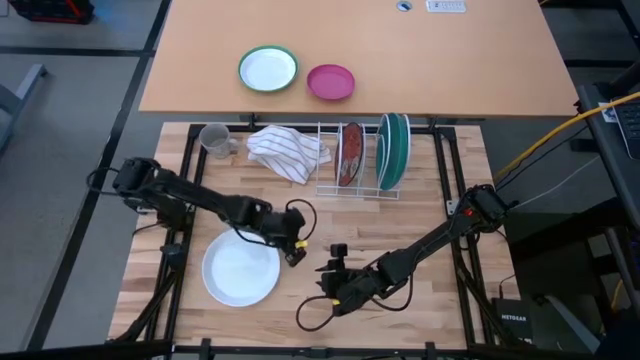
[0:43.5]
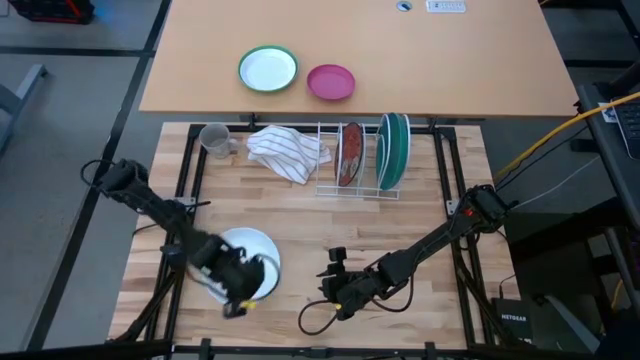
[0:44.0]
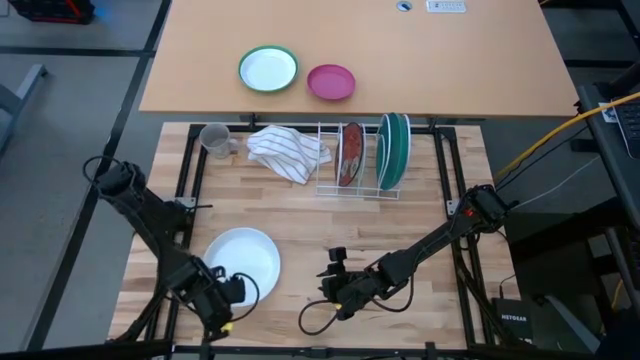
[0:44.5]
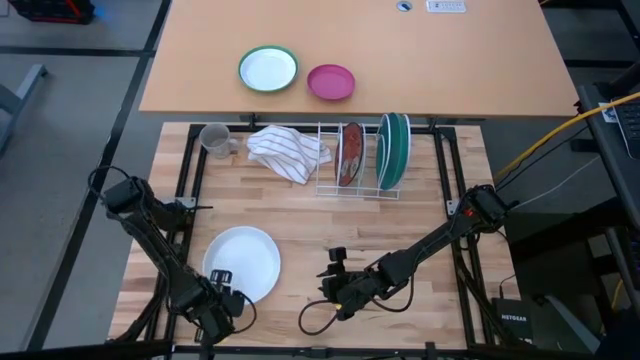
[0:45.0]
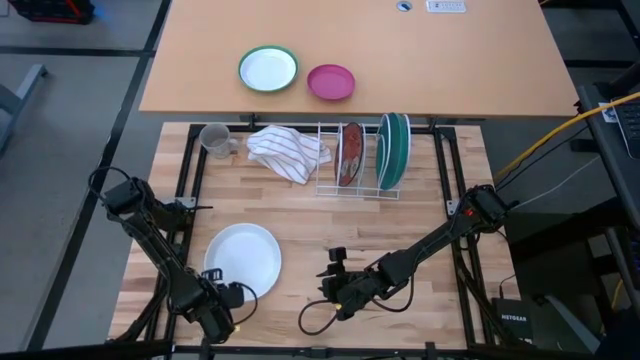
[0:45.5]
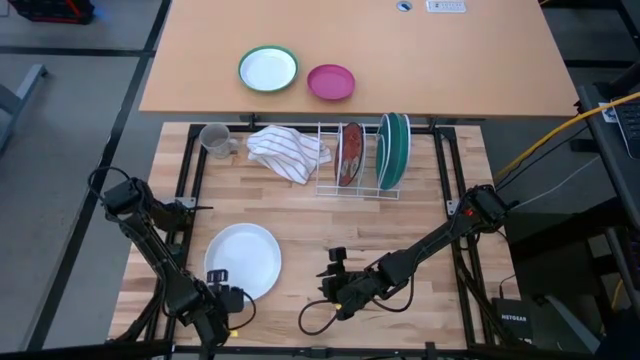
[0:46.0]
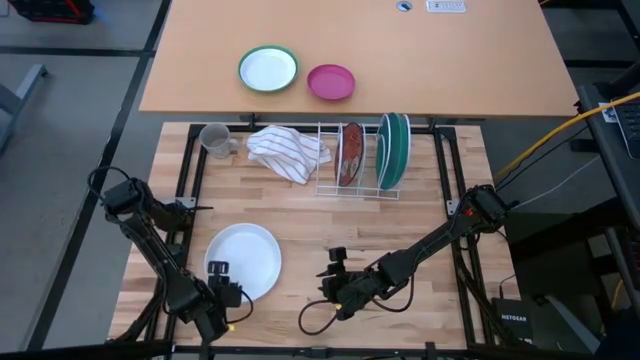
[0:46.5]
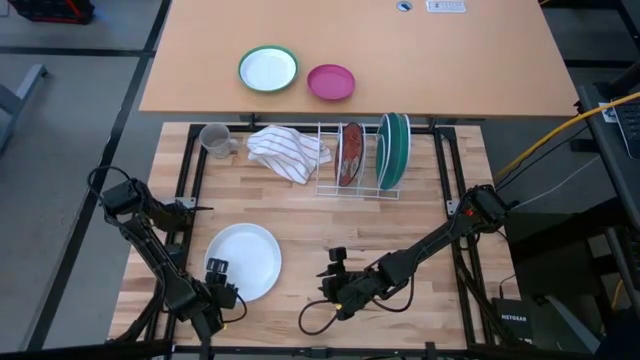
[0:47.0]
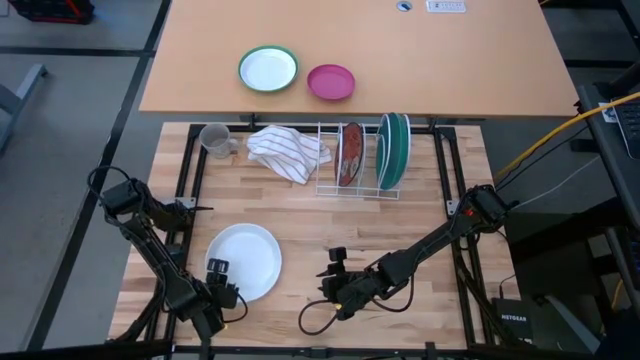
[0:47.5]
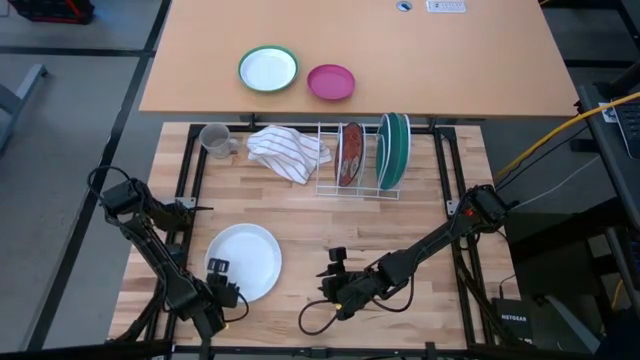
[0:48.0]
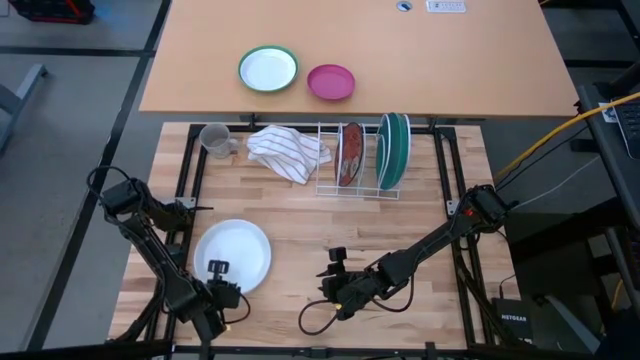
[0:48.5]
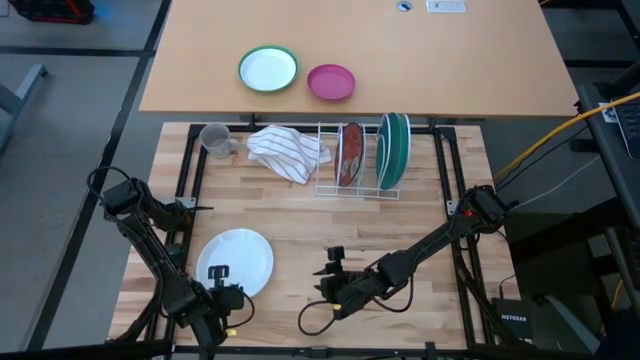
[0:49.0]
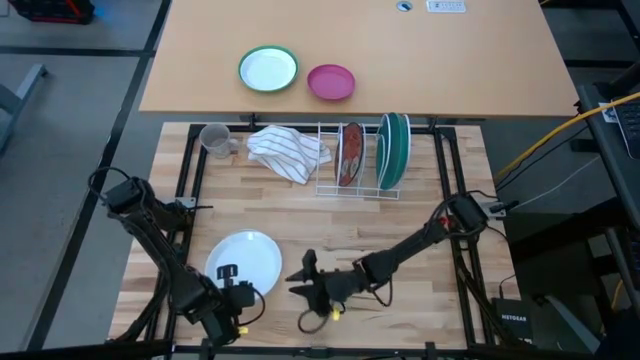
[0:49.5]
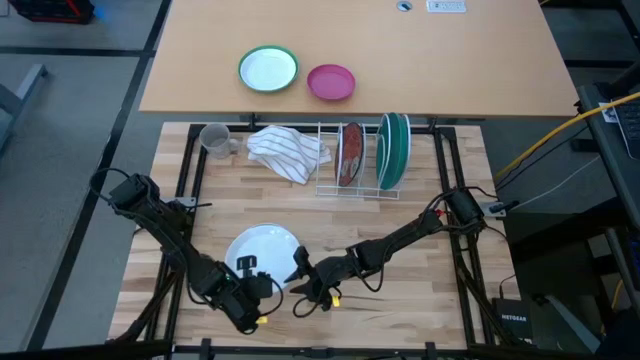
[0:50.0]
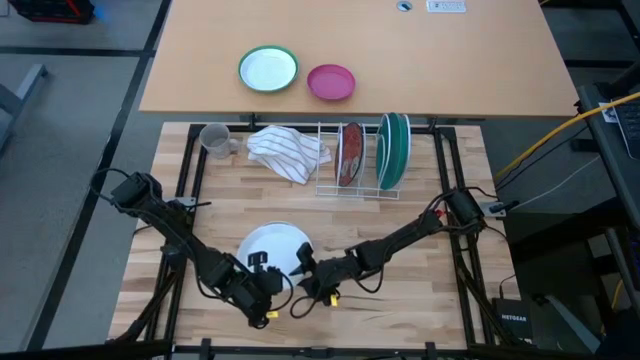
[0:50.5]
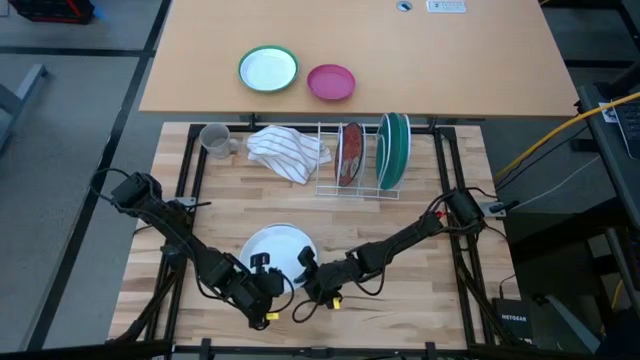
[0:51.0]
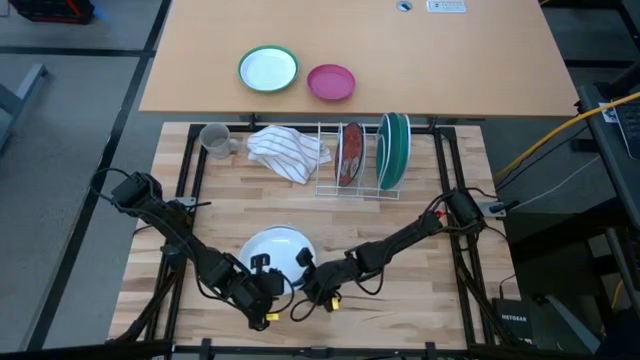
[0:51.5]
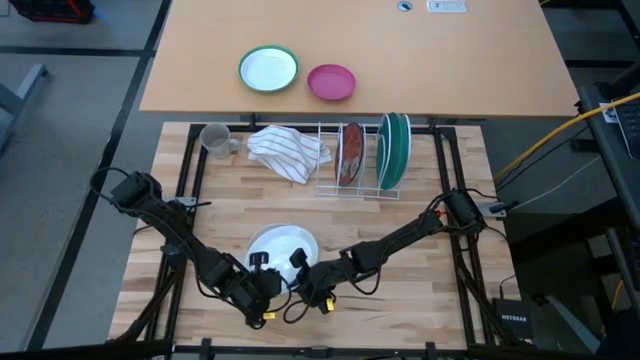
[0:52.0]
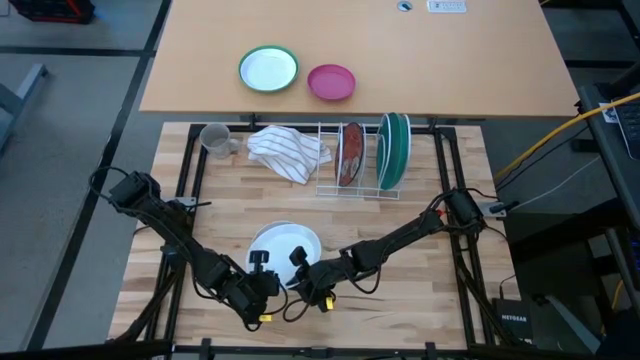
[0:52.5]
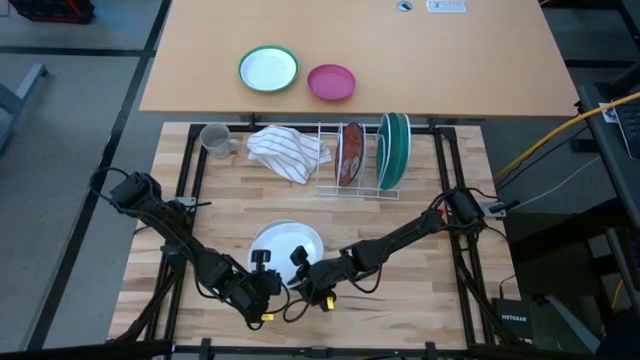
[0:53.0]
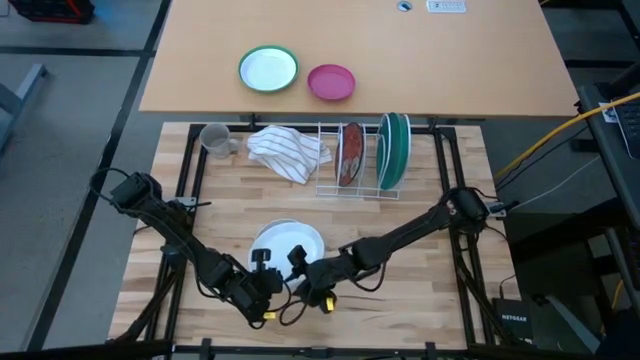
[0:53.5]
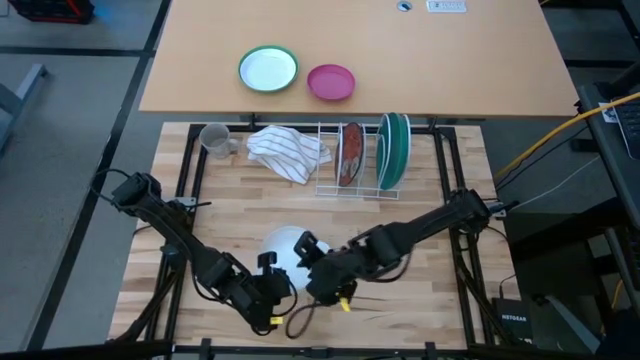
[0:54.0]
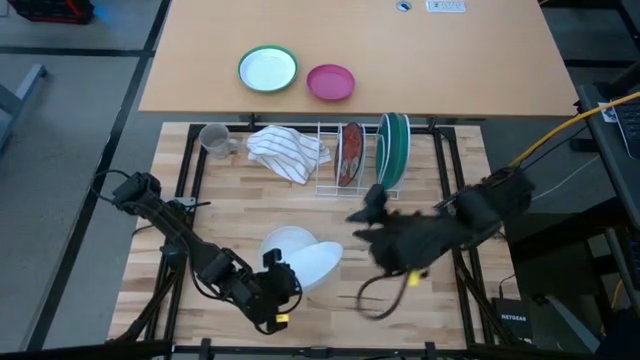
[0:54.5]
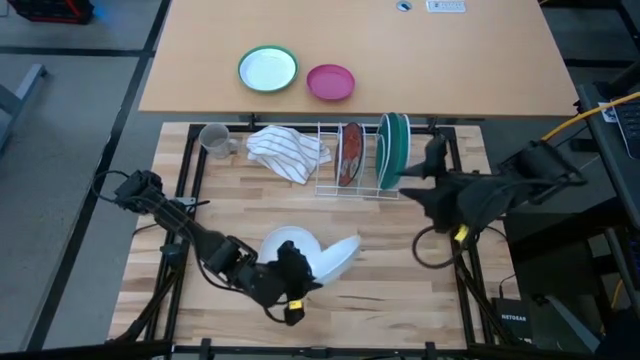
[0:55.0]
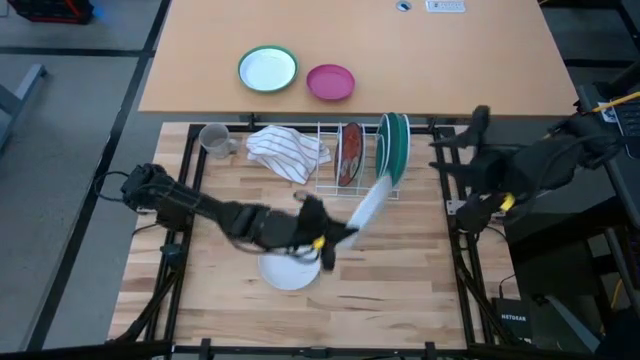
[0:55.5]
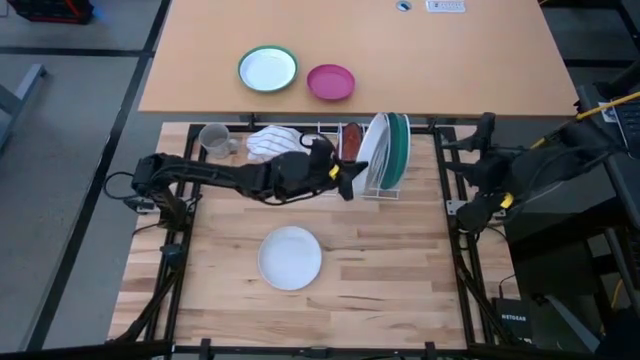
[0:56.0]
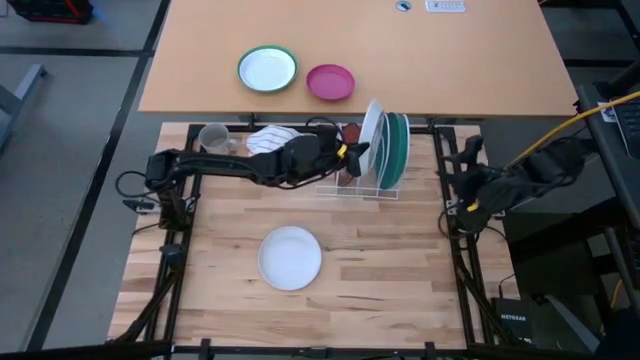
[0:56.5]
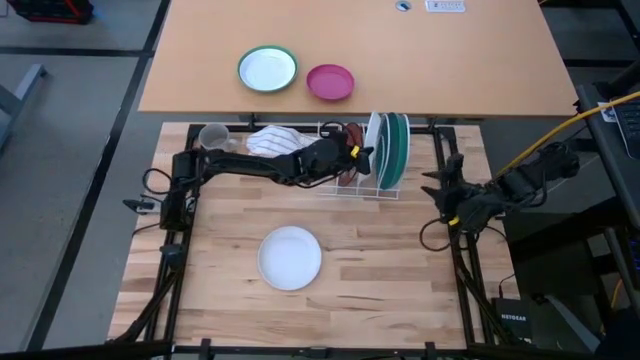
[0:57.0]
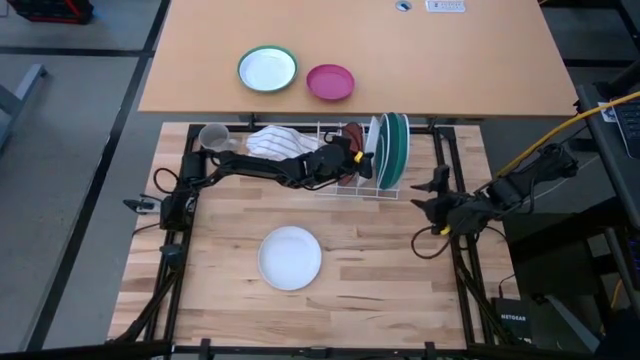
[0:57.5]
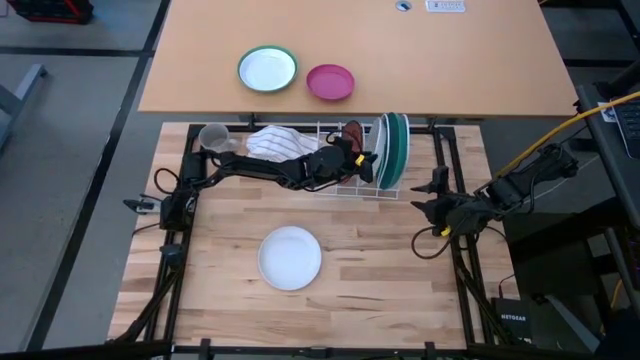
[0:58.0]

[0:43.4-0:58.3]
Task: Sort dishes
Put the white plate in the dish rack

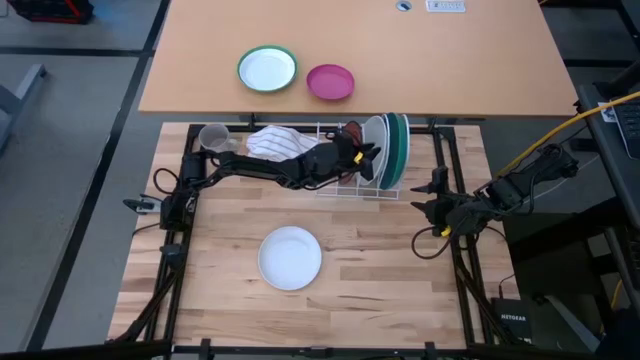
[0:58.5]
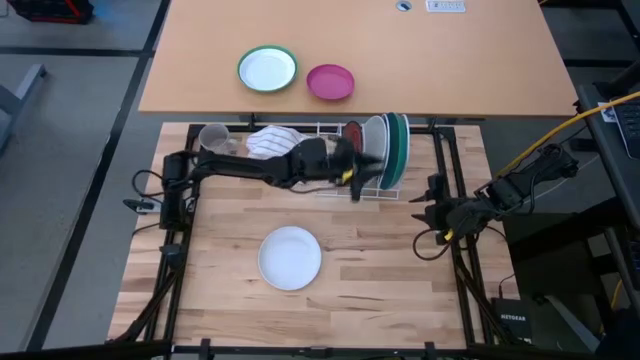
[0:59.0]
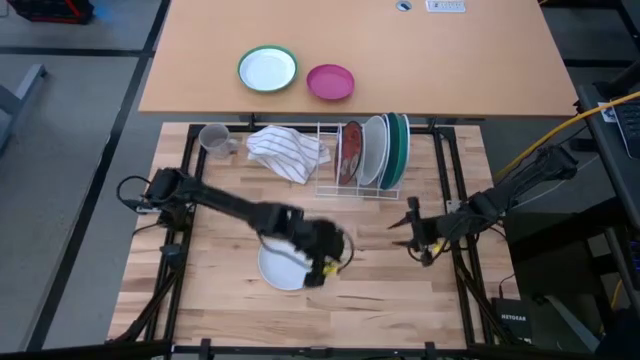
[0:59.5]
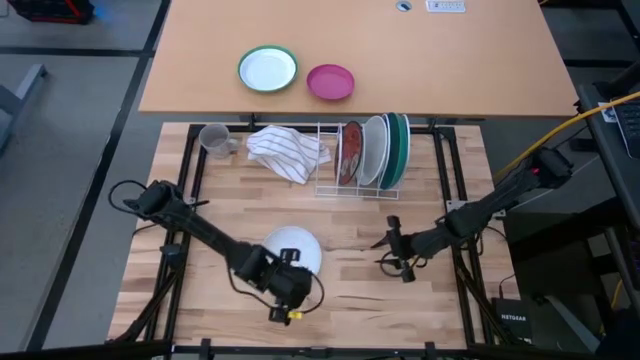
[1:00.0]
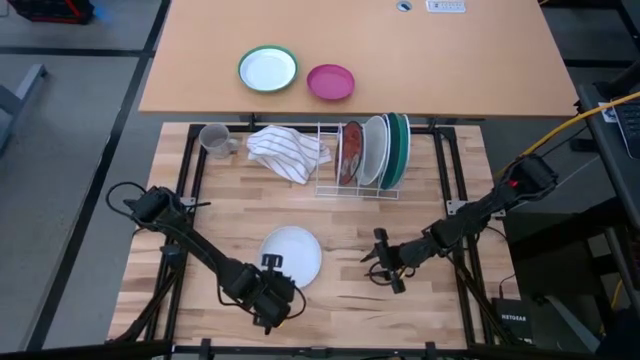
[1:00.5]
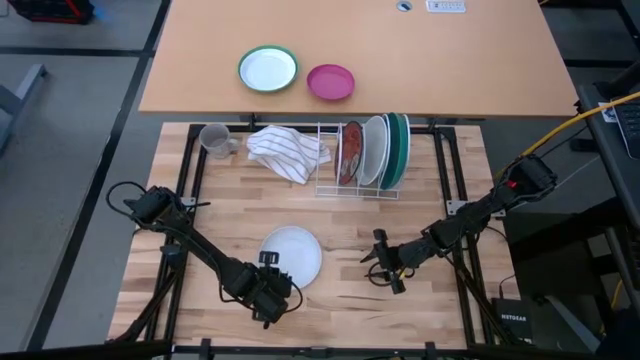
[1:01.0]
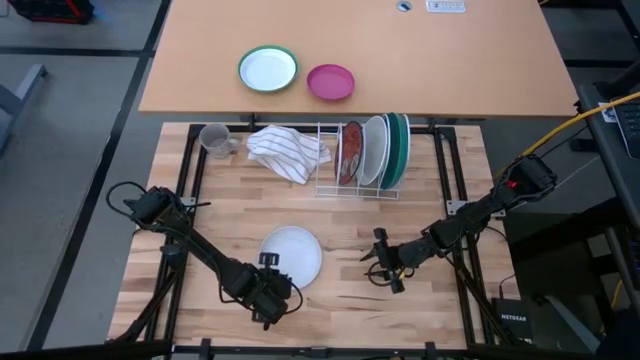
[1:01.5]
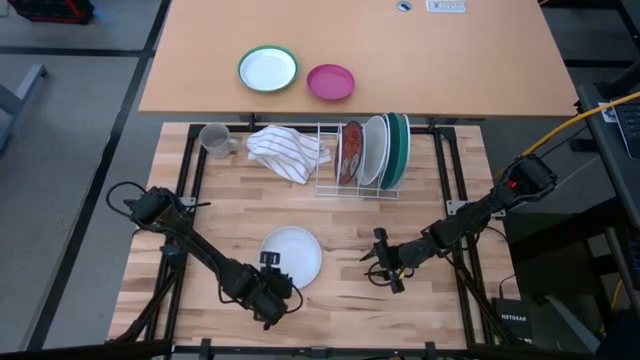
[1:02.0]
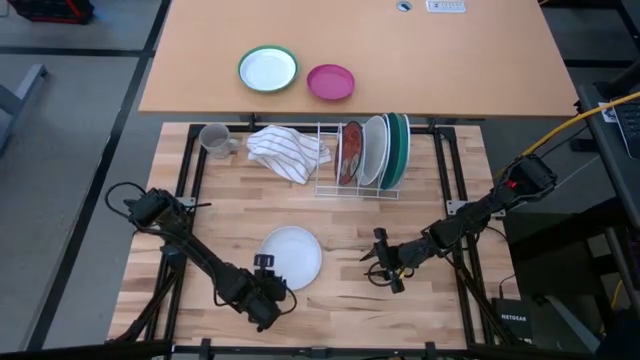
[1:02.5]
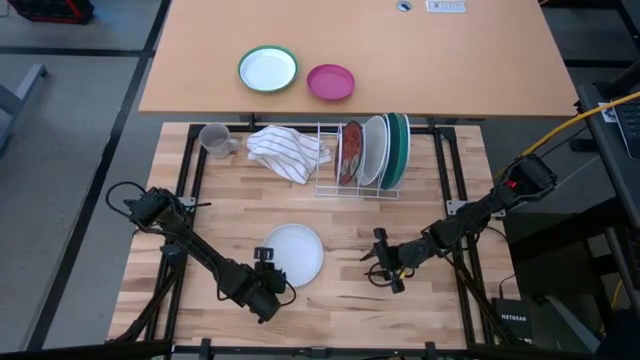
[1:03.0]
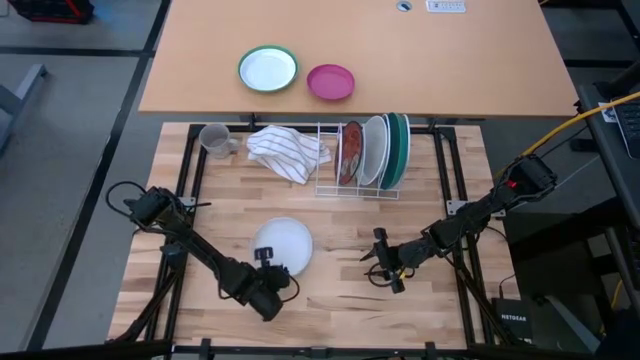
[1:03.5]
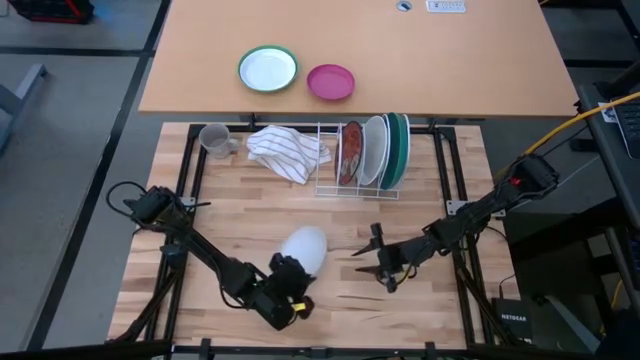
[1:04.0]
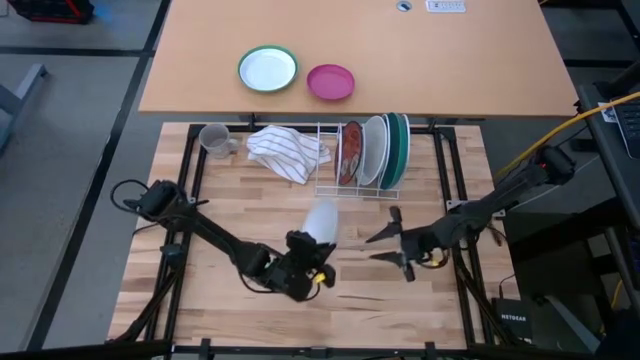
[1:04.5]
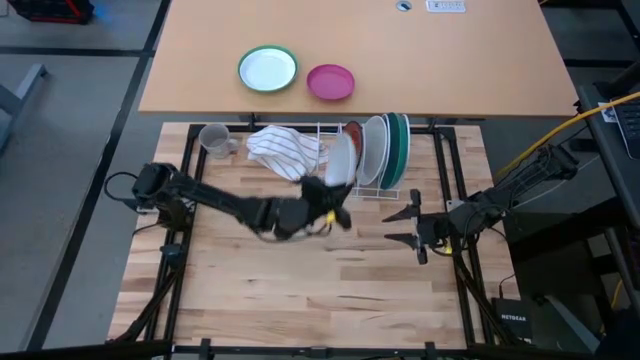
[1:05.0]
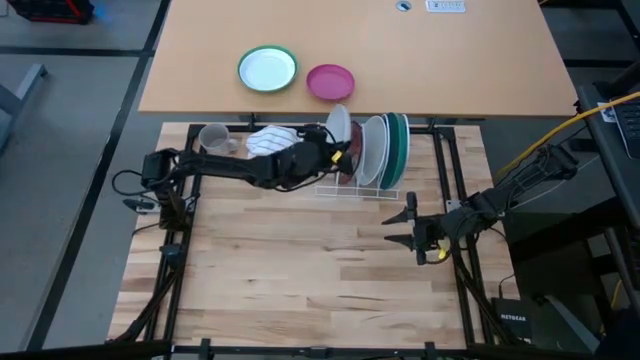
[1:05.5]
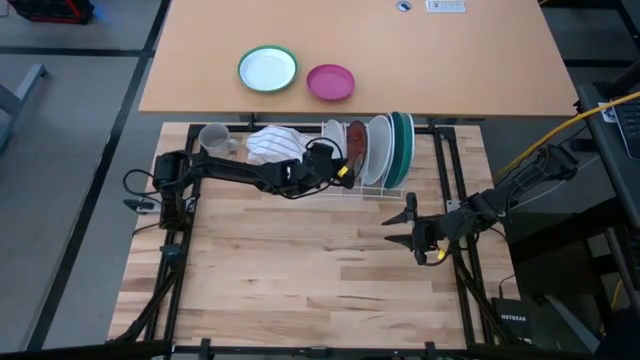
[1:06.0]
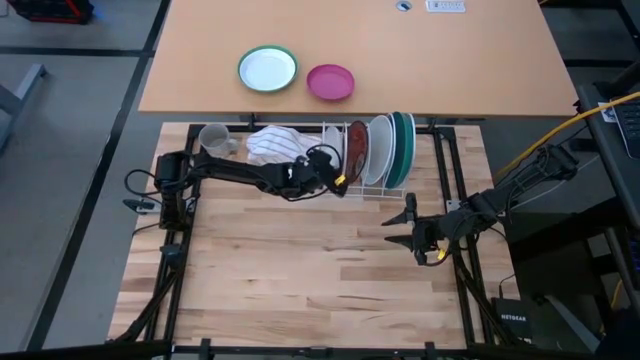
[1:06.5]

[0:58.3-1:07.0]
Put the white plate in the dishwasher rack
